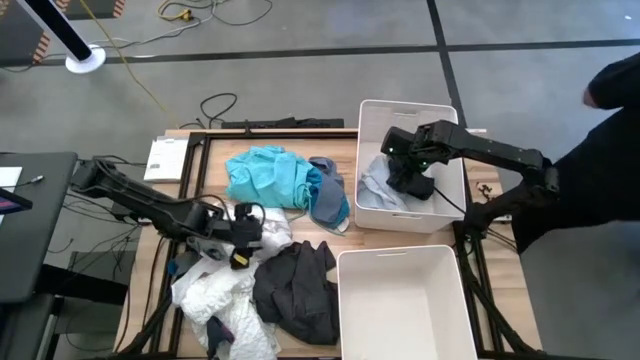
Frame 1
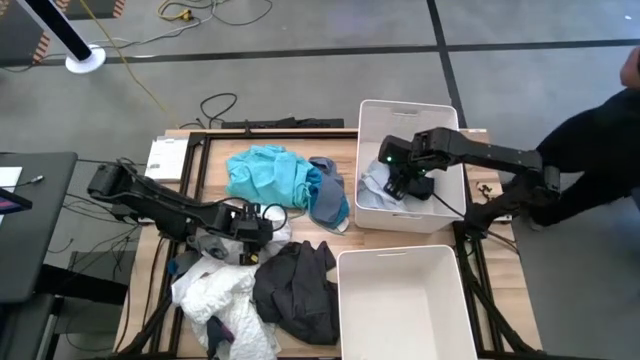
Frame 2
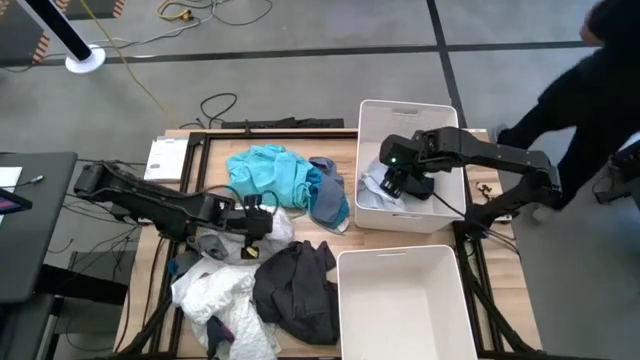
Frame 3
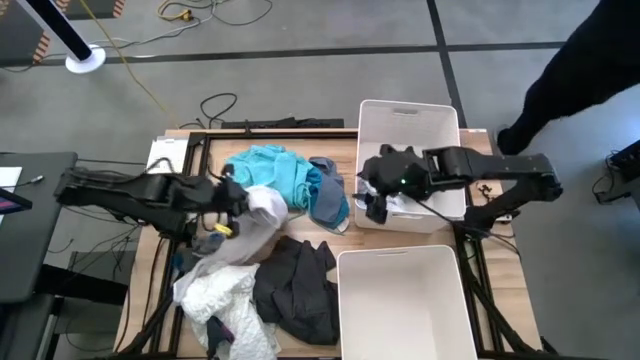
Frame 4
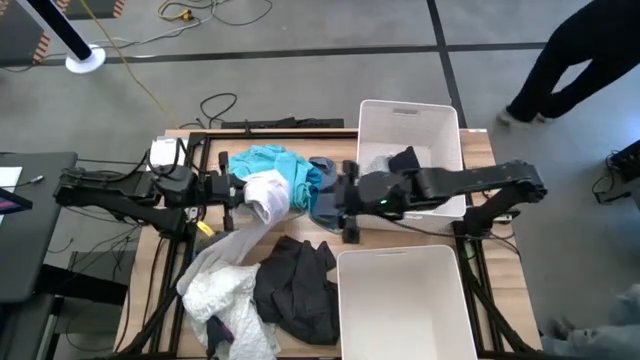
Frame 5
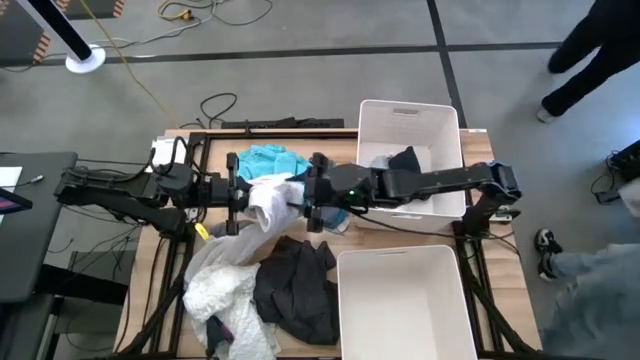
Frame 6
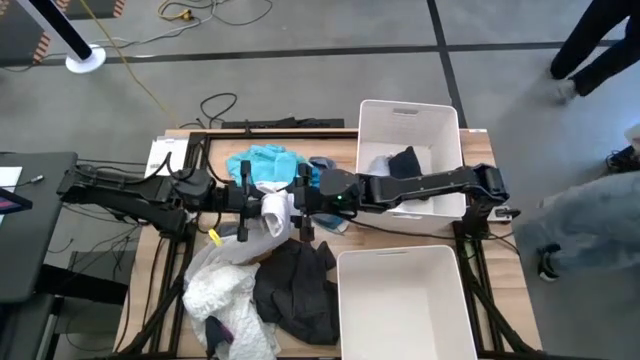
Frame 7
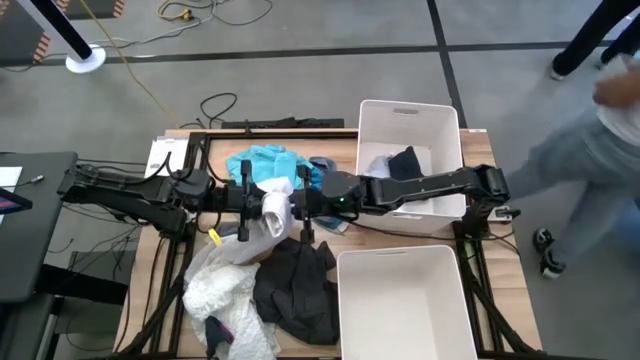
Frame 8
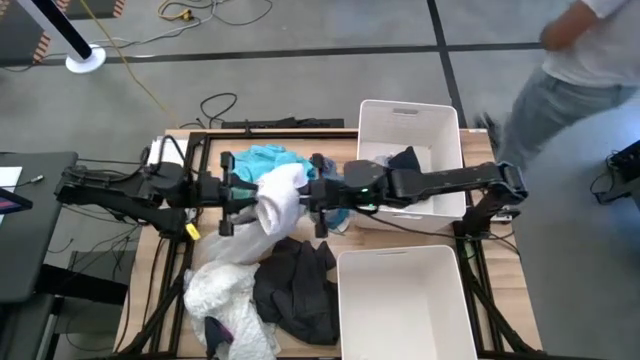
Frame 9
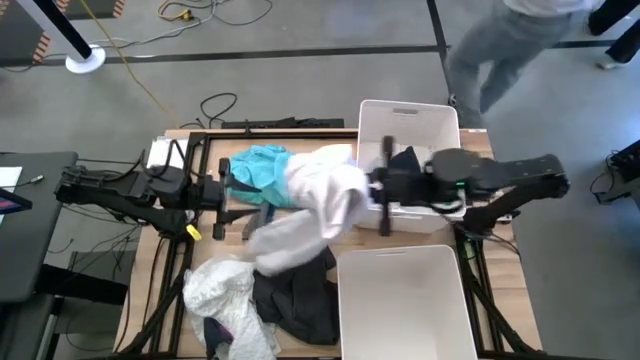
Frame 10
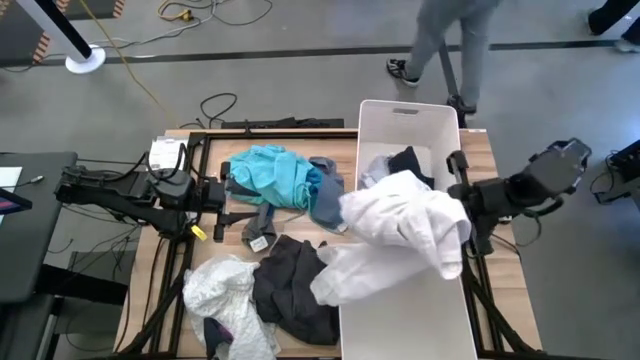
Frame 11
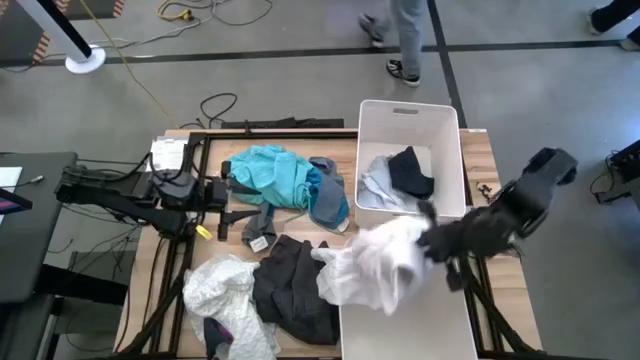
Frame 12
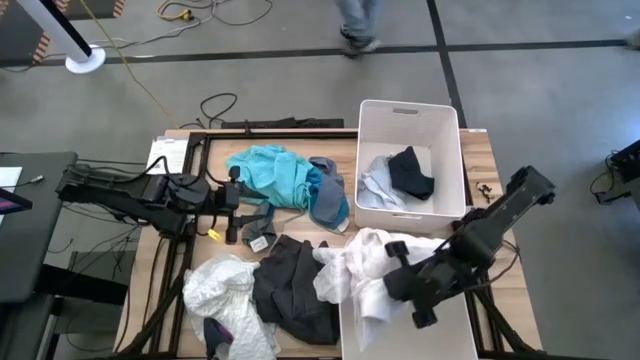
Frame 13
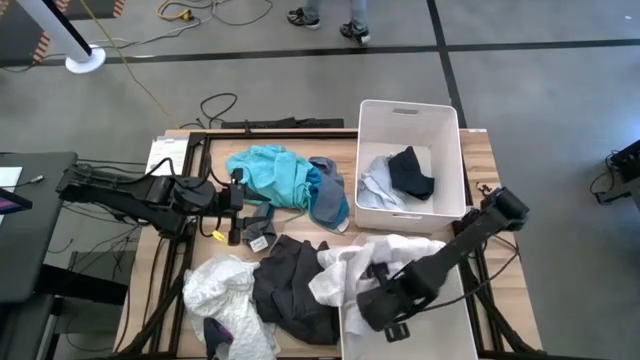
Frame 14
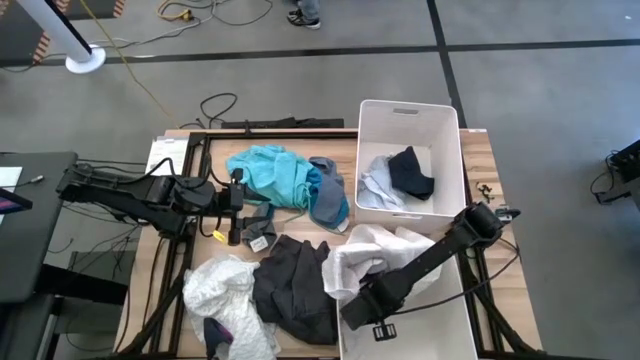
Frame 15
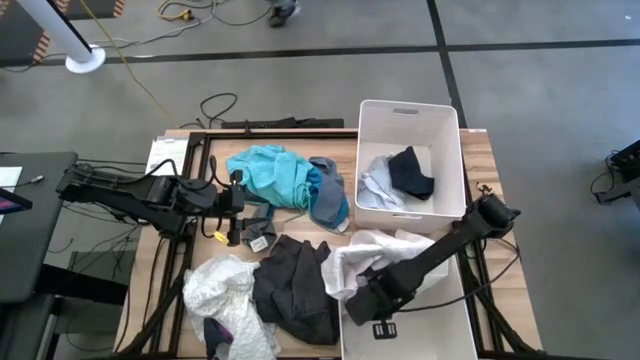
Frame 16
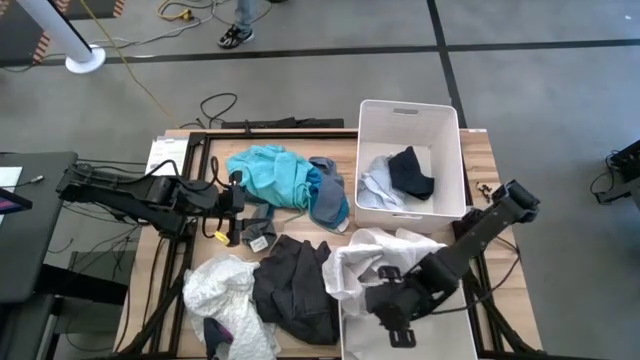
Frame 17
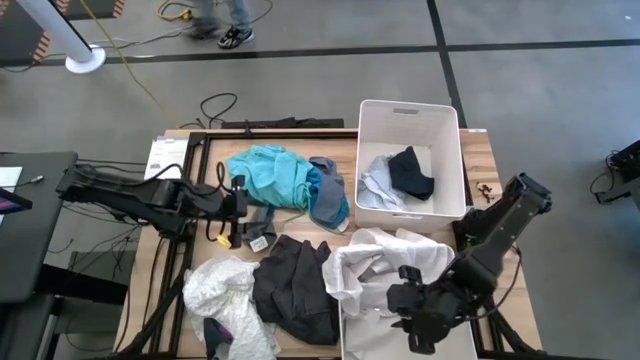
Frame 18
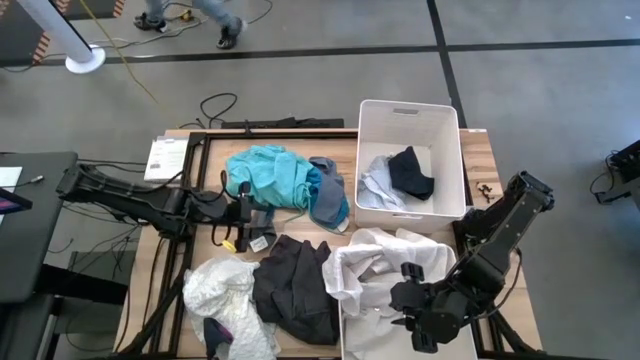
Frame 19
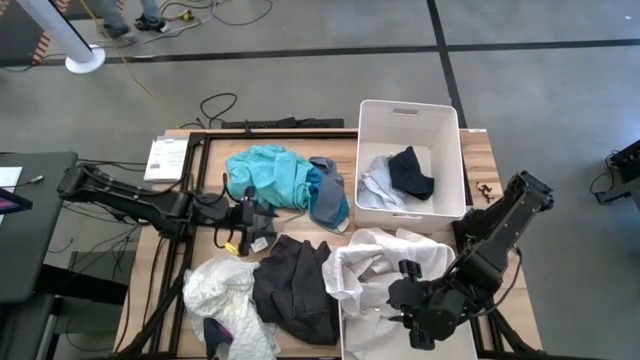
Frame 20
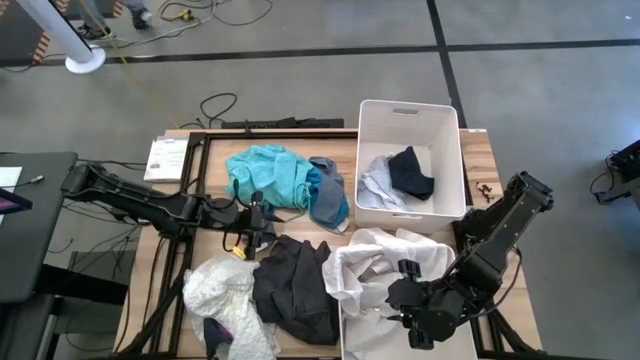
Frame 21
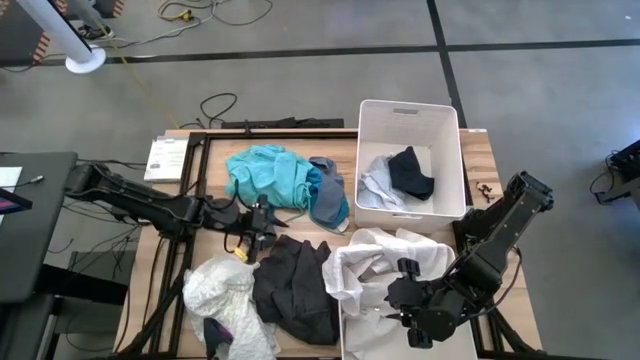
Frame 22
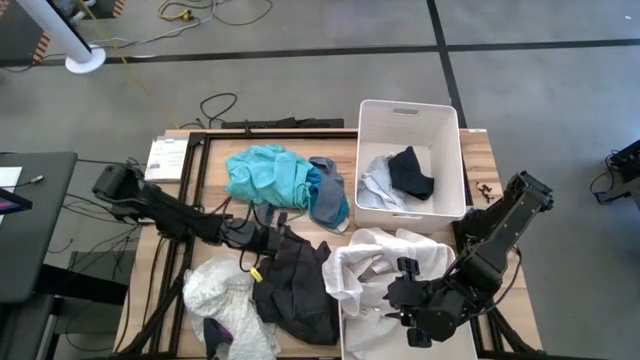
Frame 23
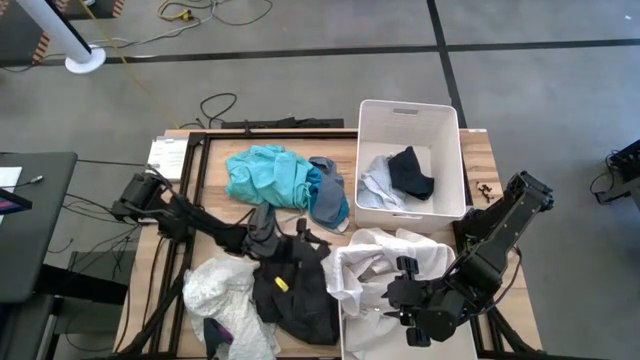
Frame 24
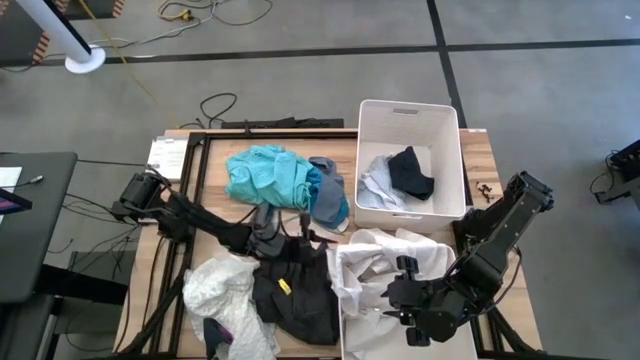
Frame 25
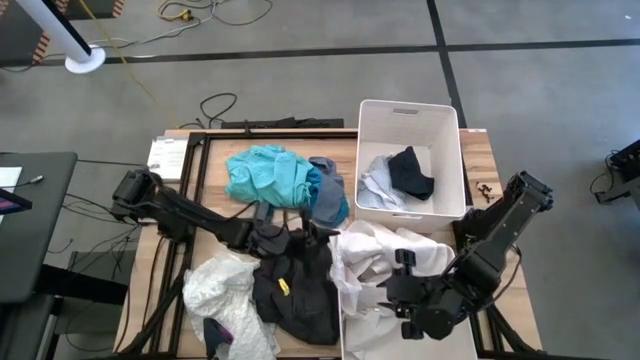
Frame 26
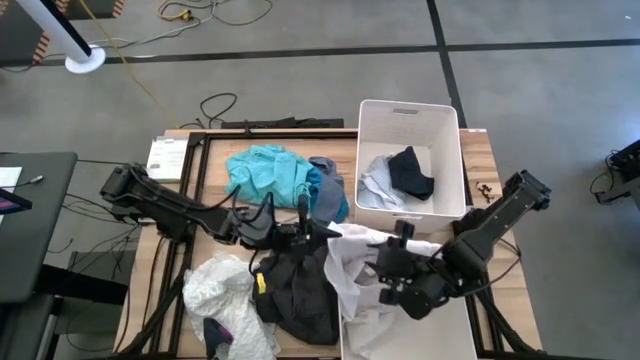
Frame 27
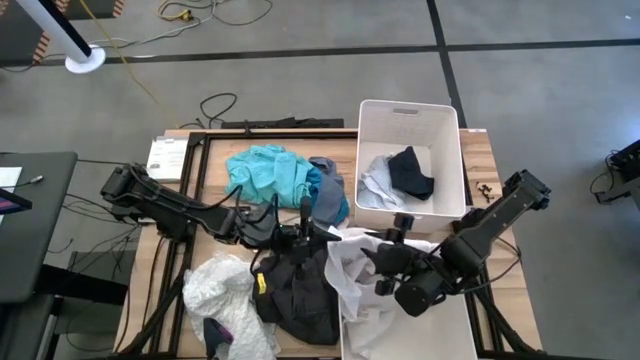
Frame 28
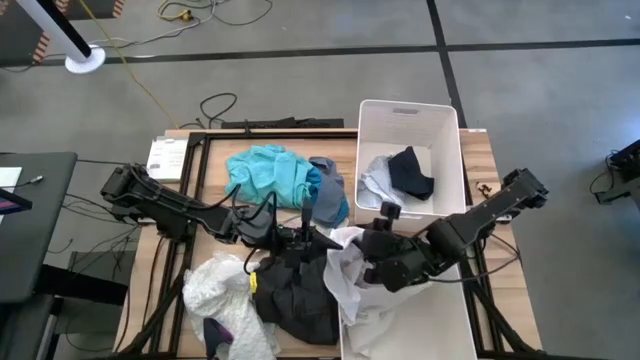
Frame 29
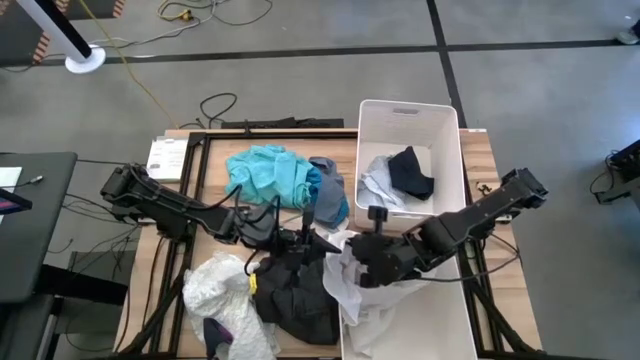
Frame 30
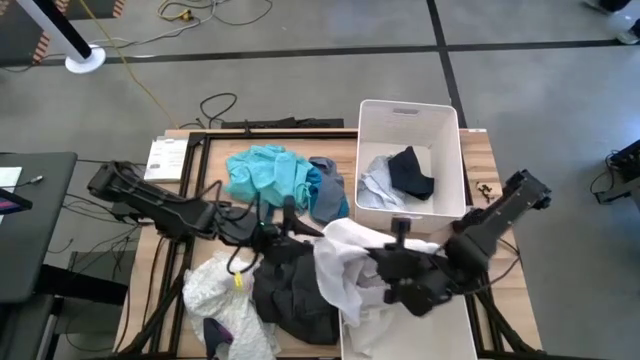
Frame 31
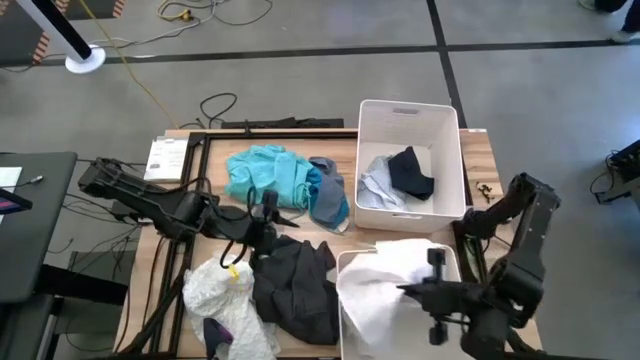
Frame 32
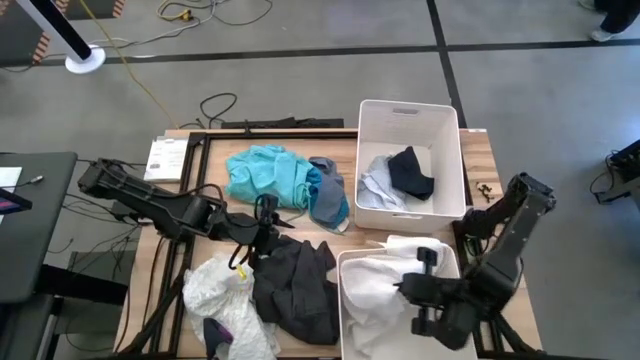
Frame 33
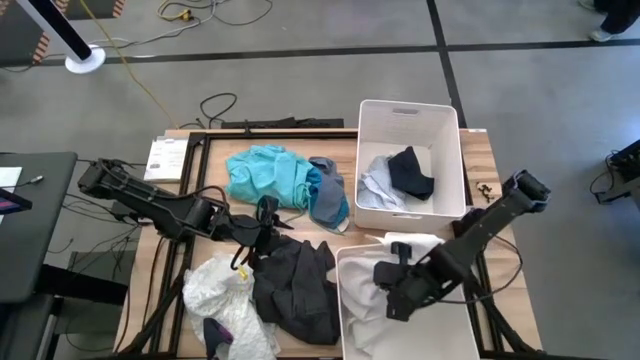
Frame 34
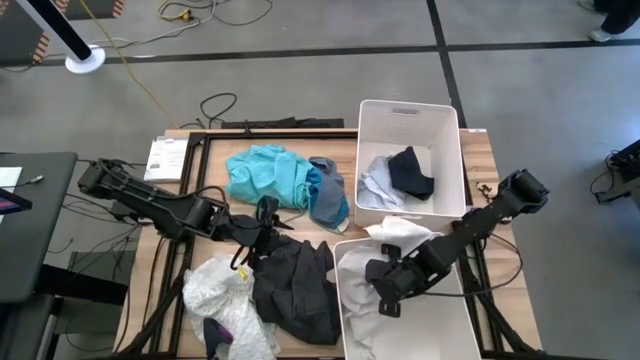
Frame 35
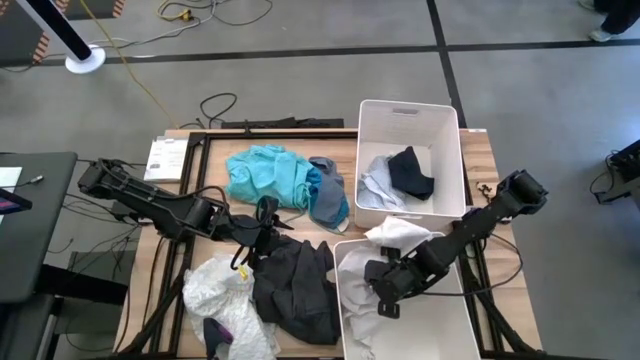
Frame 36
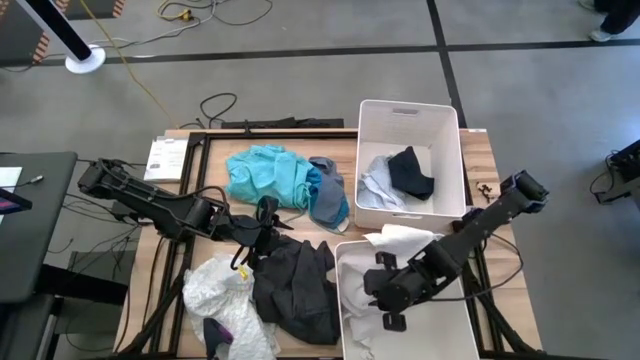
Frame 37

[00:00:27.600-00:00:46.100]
Task: Sort clothes
Put the top white shirt into the bottom white laundry bin

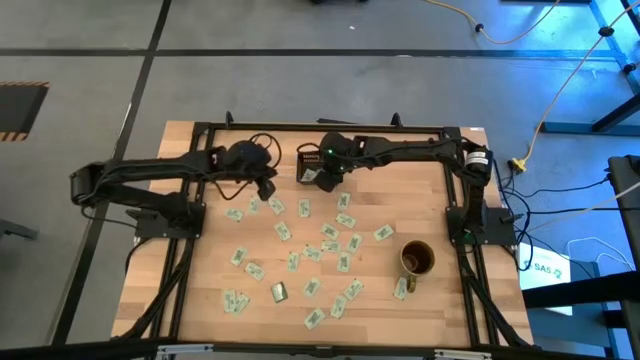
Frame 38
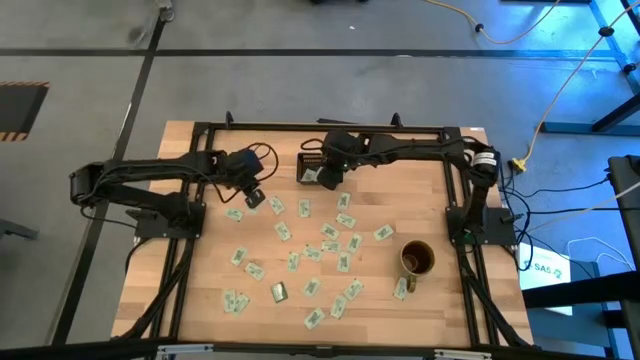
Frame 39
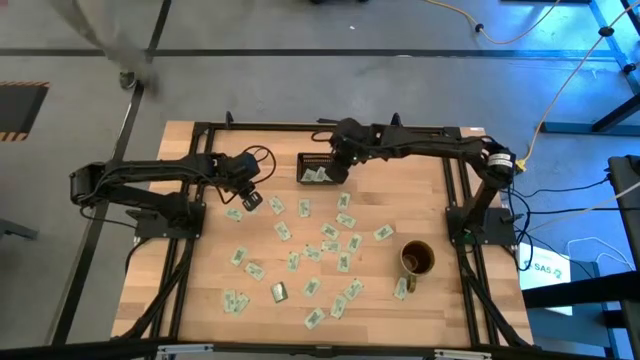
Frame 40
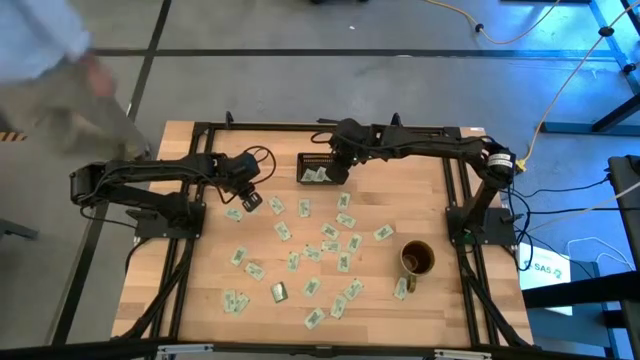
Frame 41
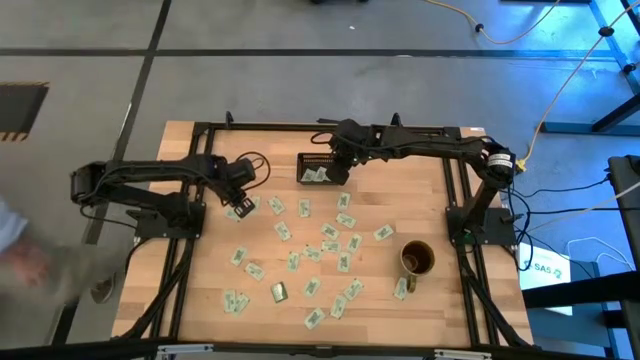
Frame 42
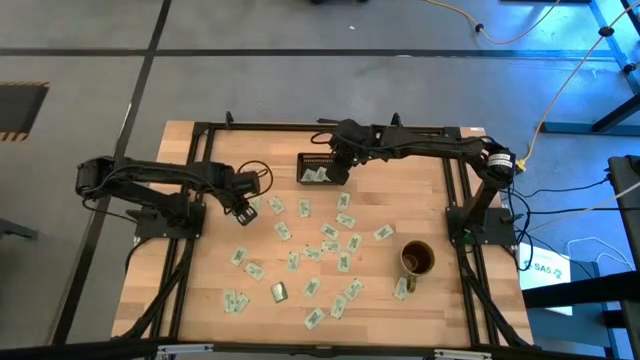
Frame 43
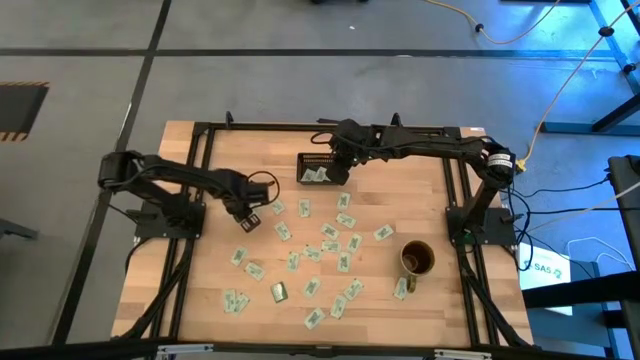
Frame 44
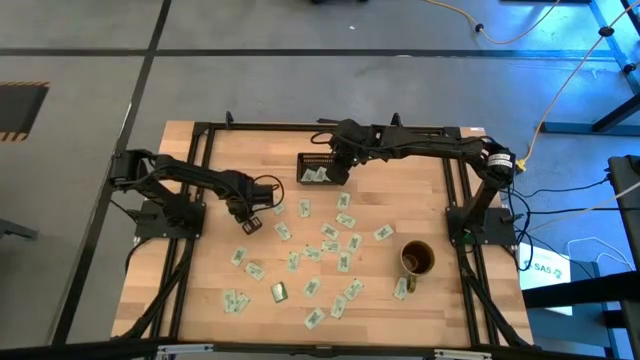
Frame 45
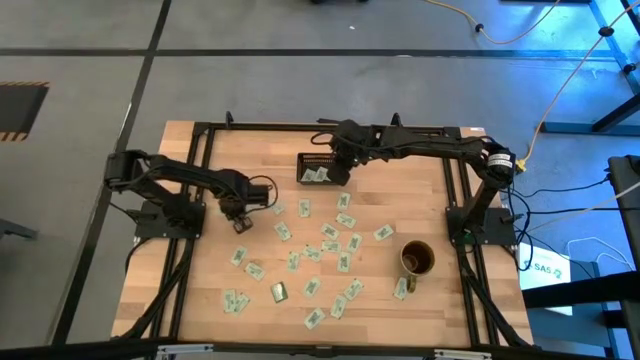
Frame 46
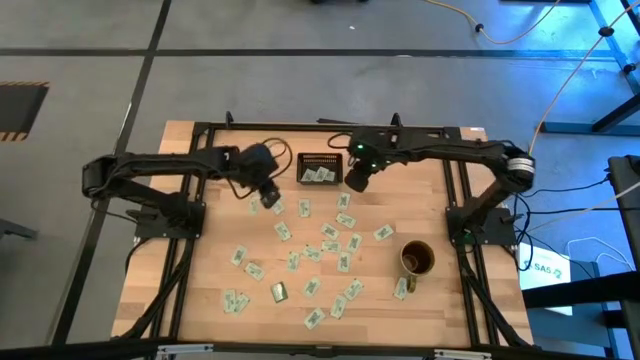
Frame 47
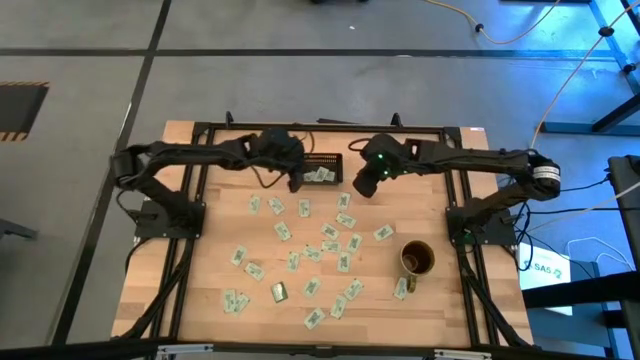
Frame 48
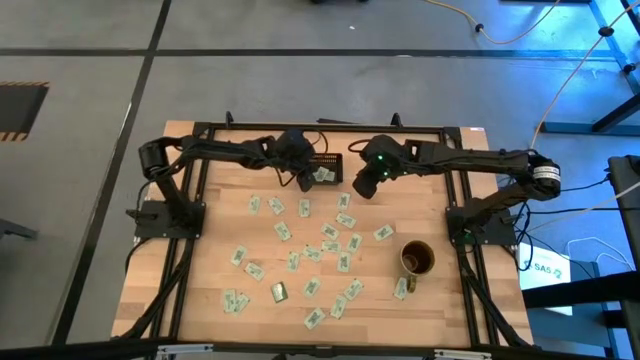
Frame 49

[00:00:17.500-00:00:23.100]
Task: Pick and place Stevia / Truvia into bins
Put the white stevia packet into the black bin
